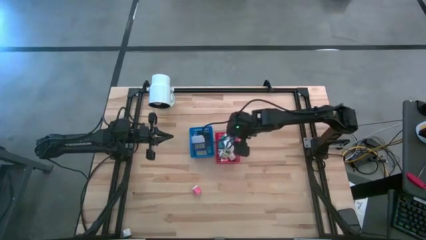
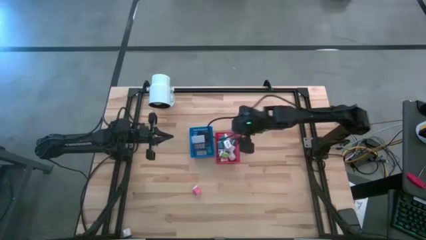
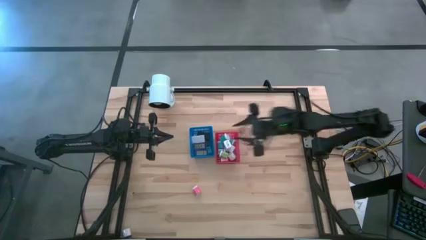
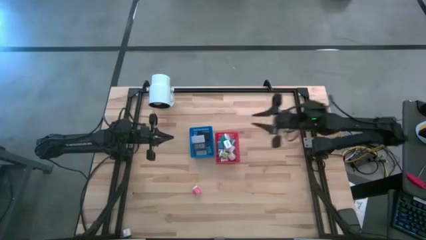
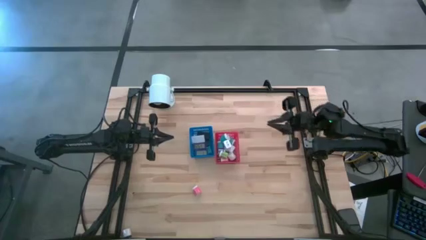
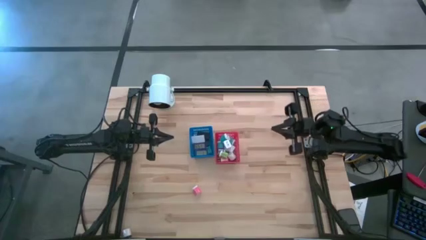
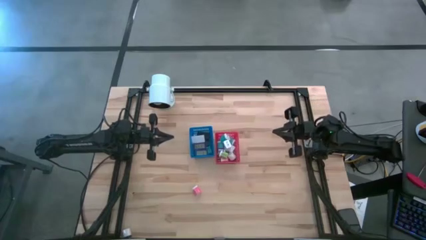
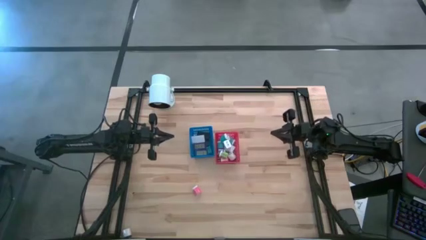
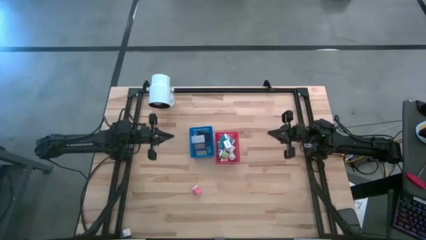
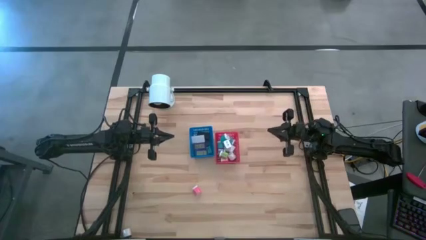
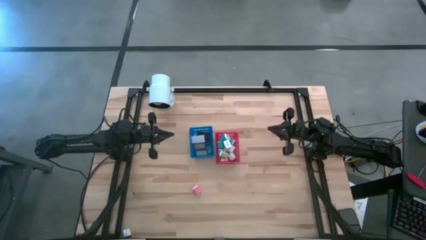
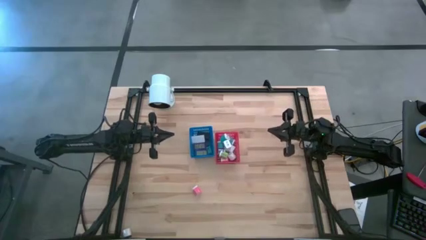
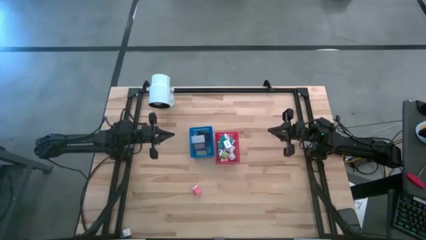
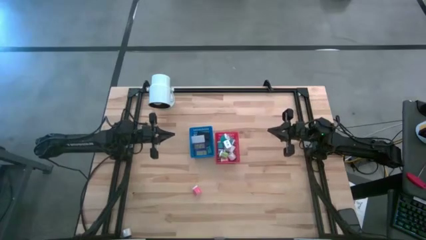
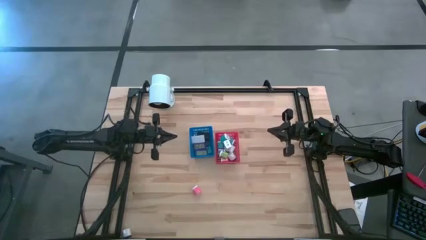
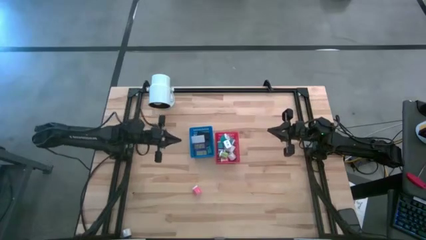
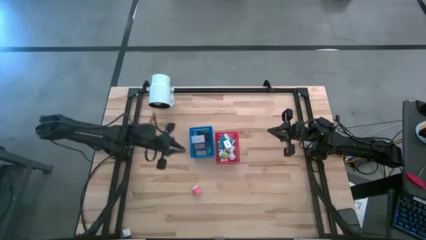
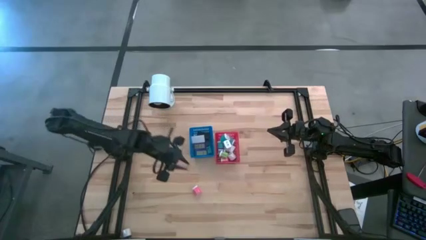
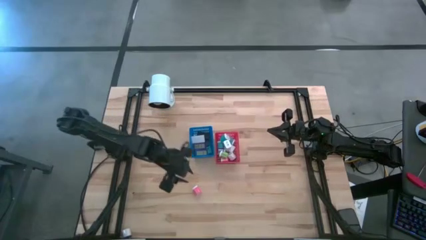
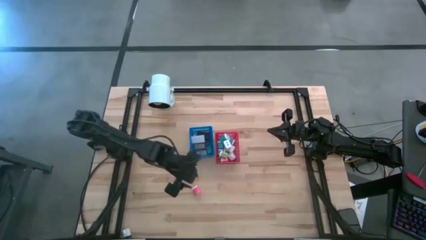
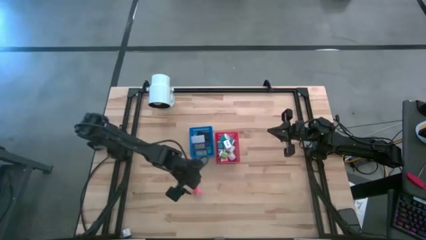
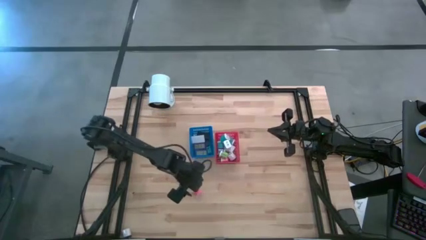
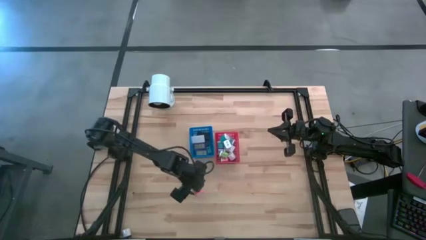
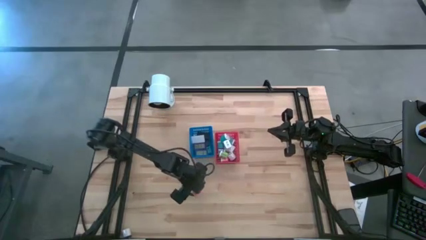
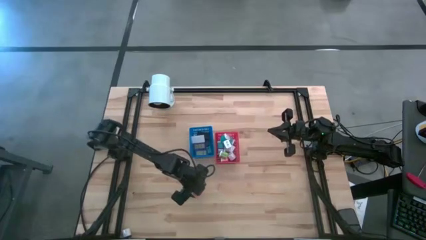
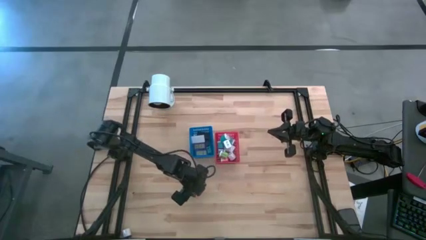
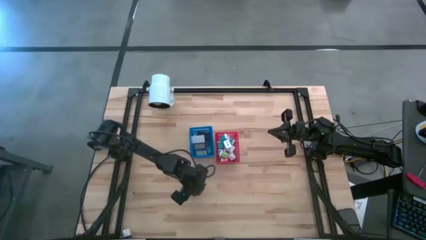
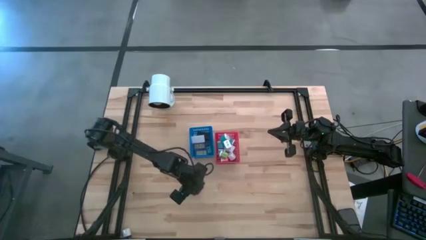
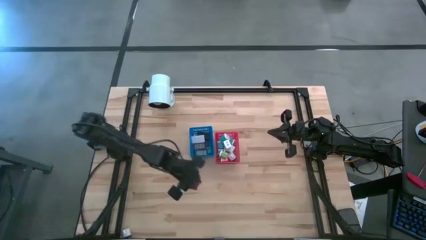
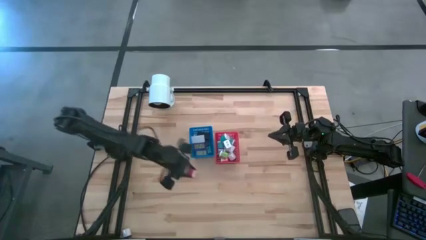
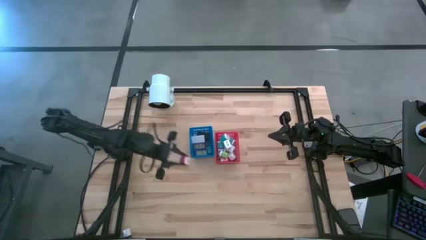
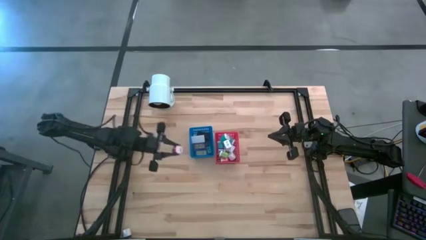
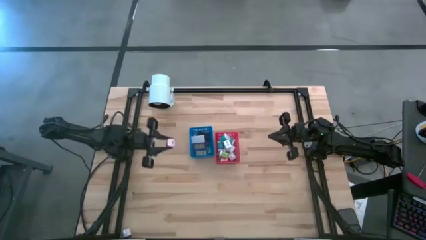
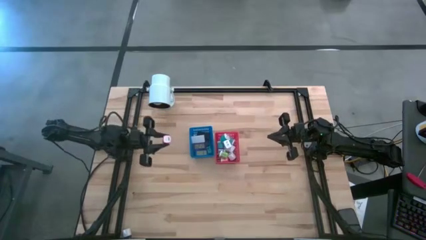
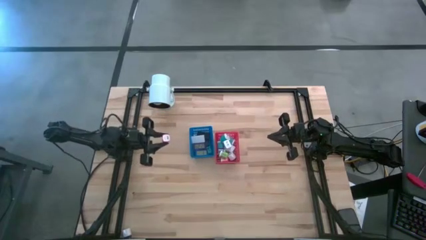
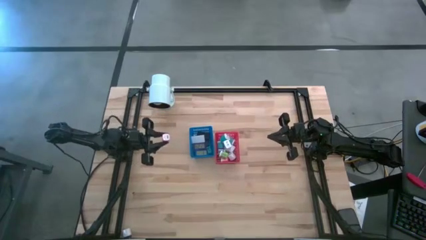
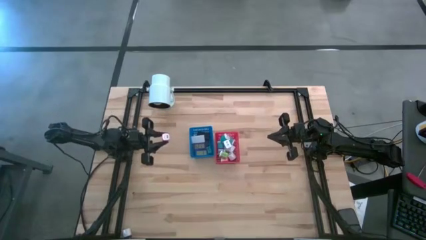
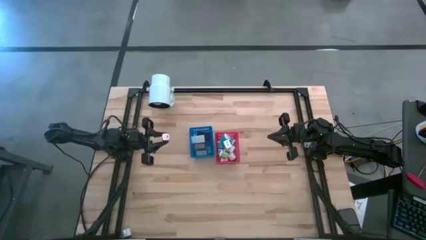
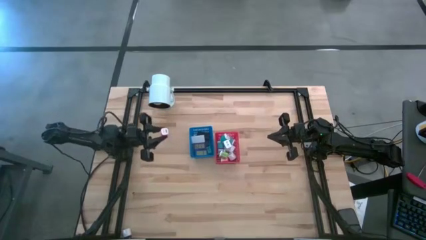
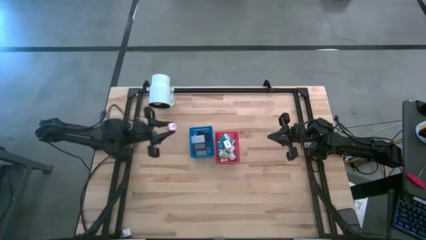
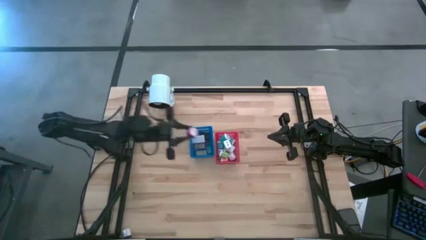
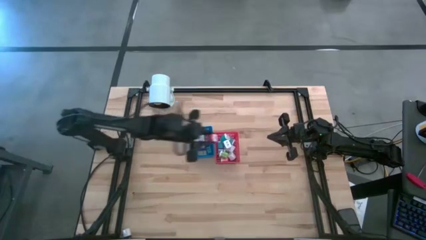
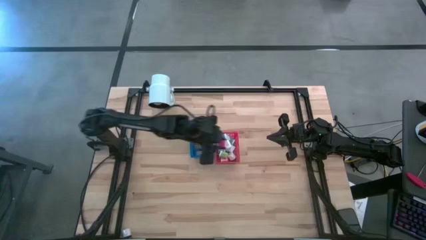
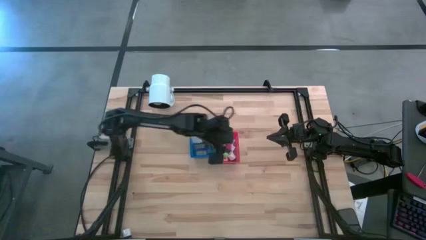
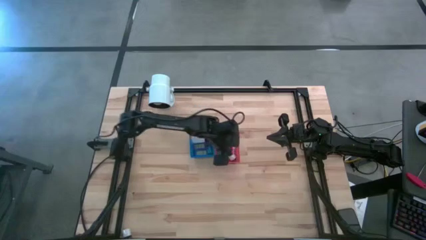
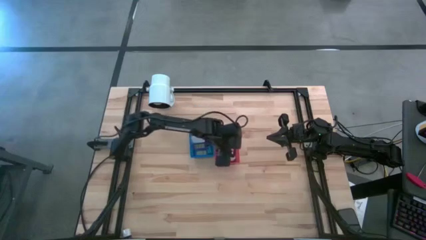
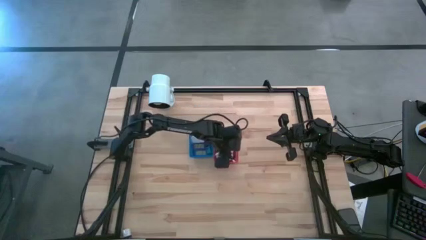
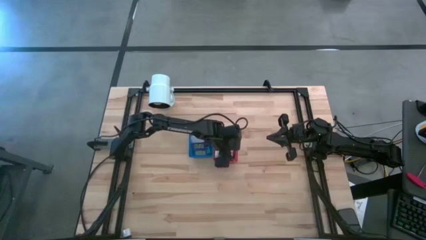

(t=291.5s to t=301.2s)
Task: Pick & Place Office items
Put the pink charger adapter into the red bin

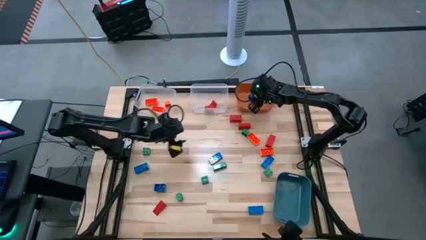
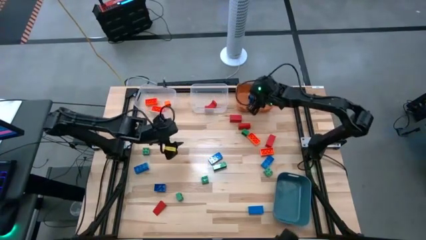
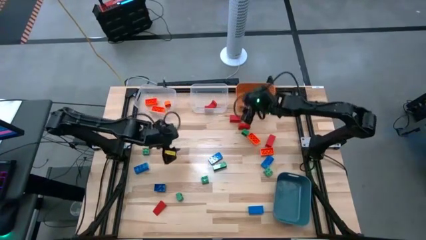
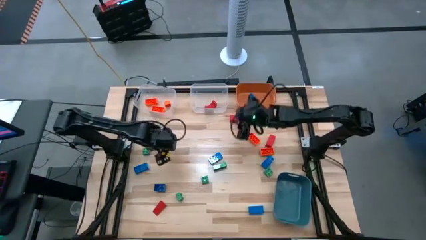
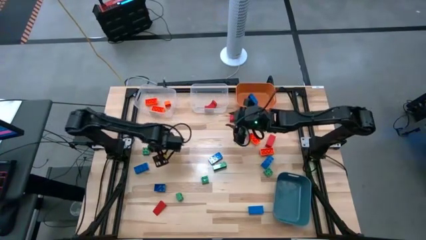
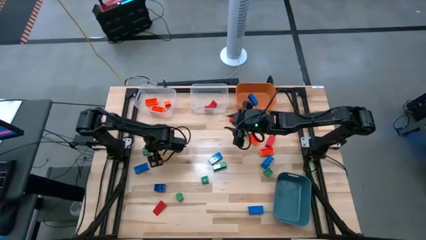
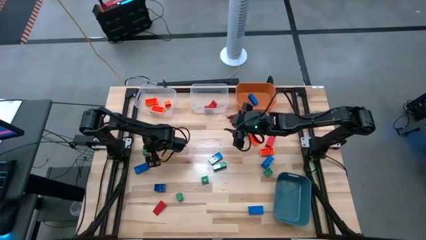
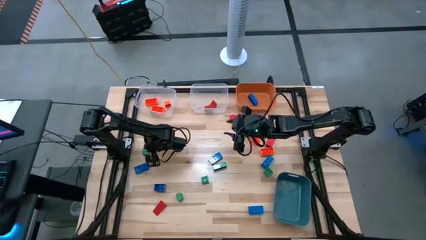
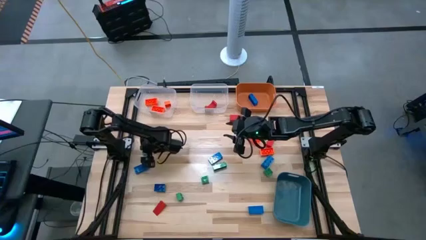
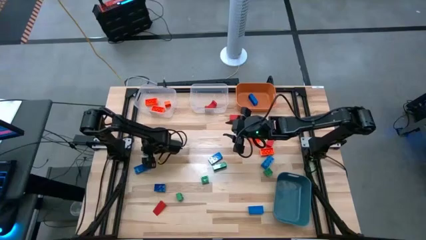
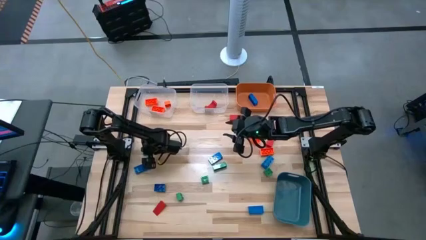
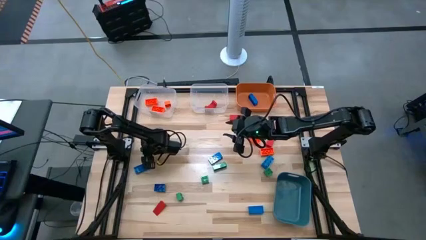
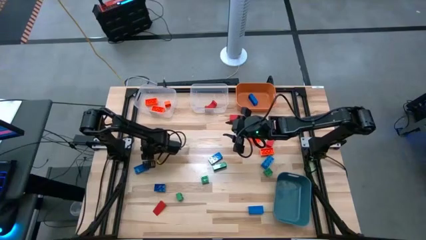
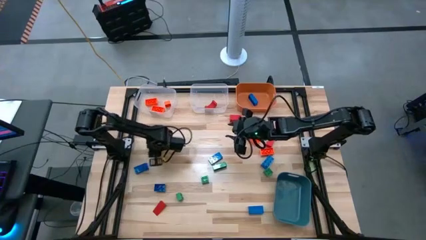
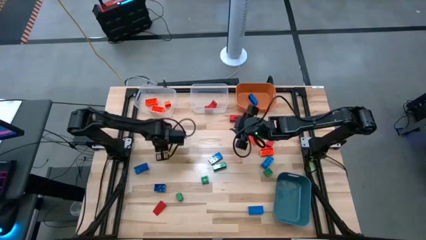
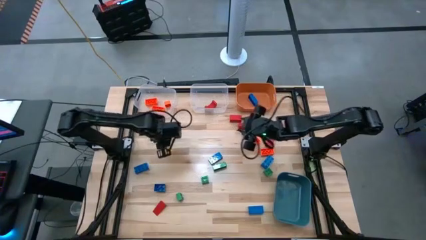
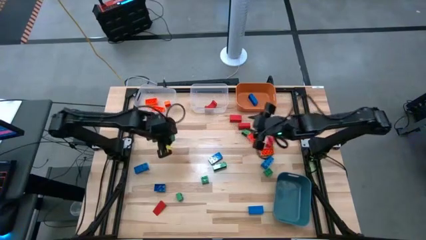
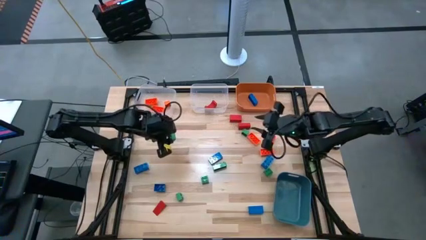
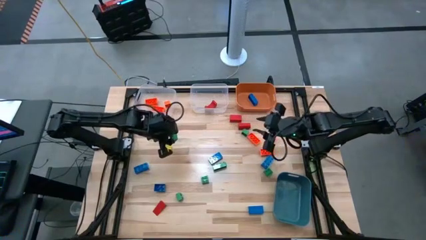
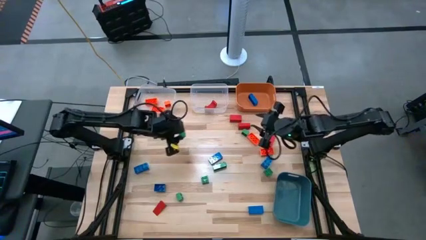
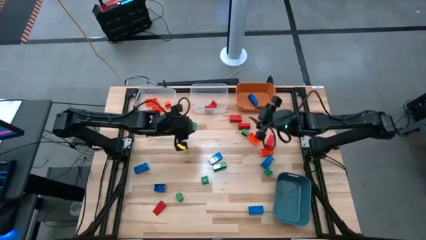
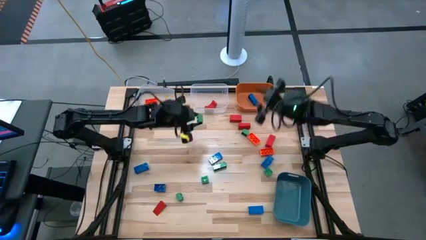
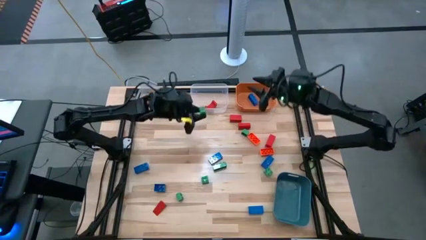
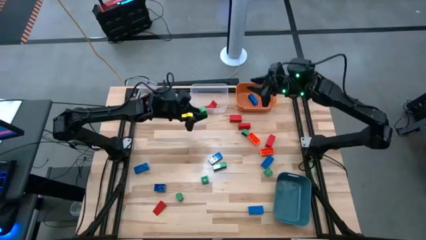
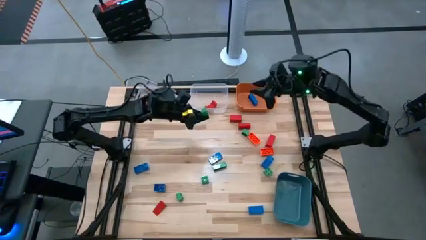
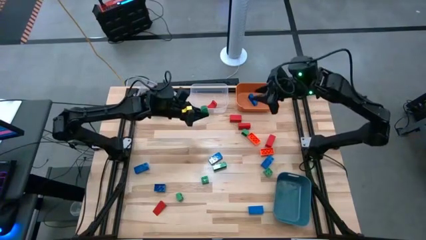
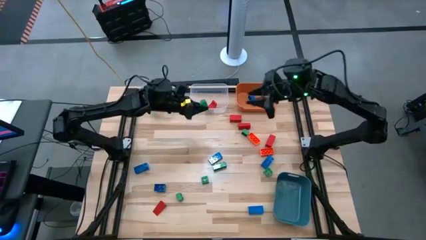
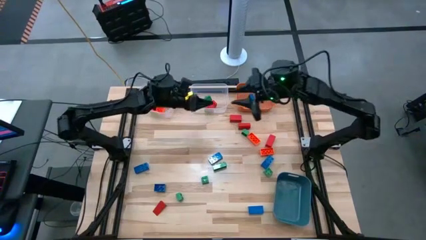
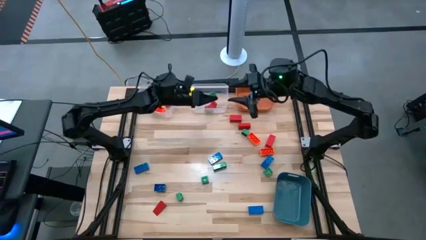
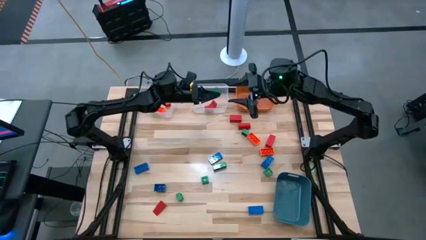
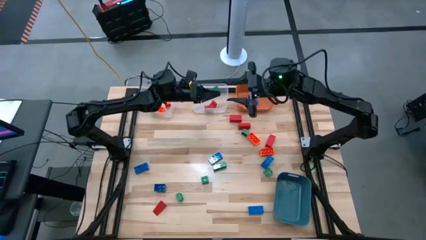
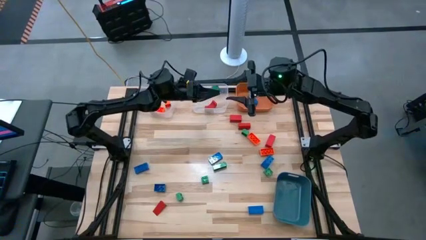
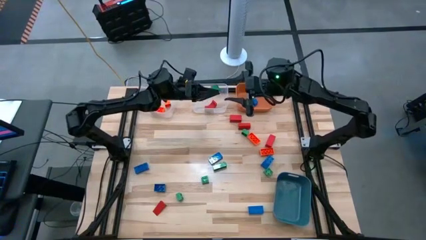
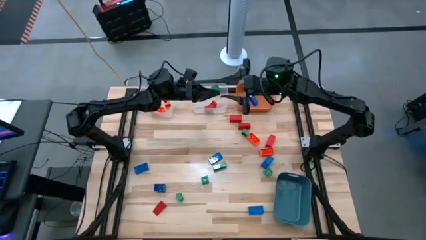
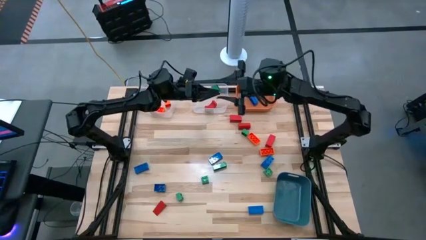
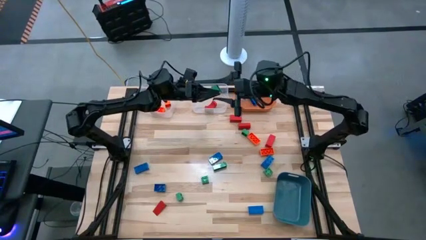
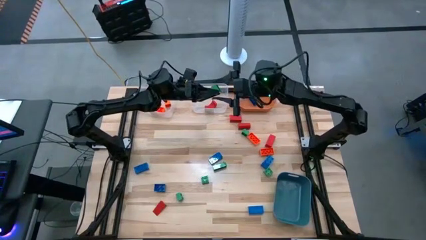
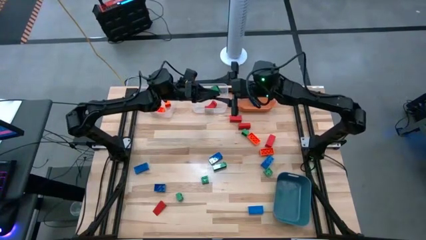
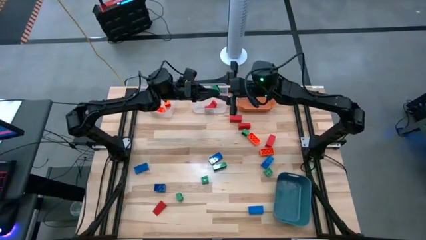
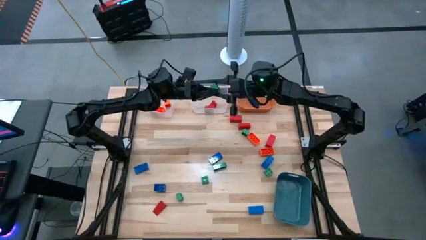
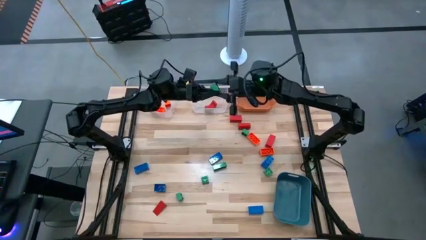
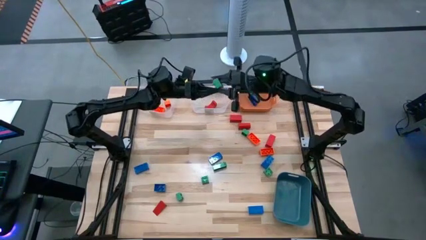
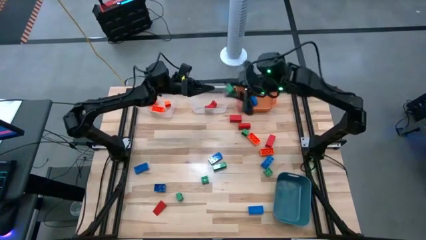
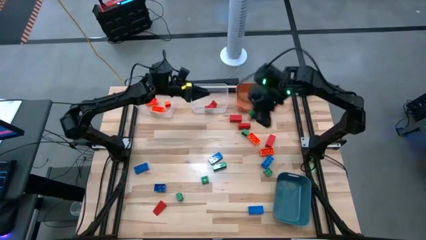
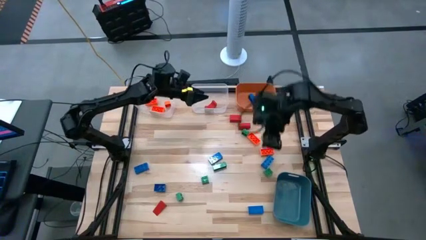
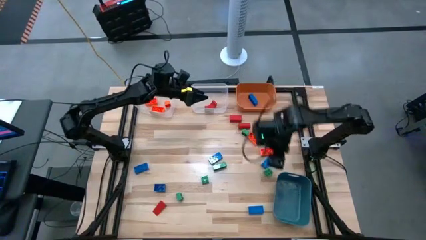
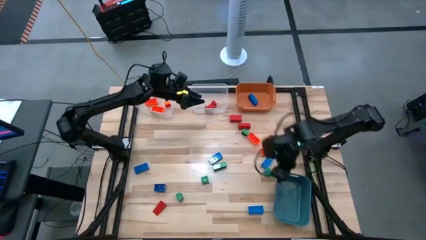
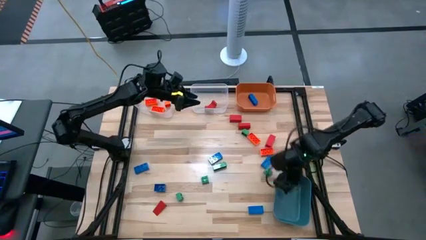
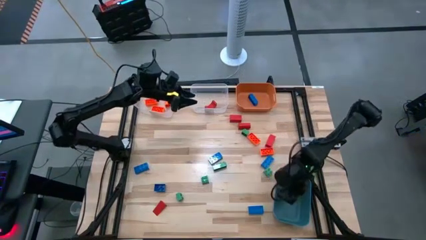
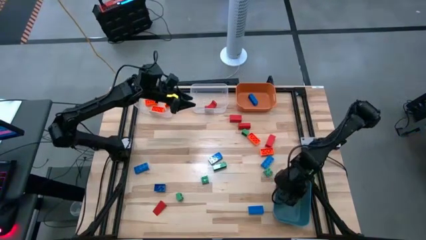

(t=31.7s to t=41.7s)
Task: Sort blocks
Put the green game piece into the blue bin
